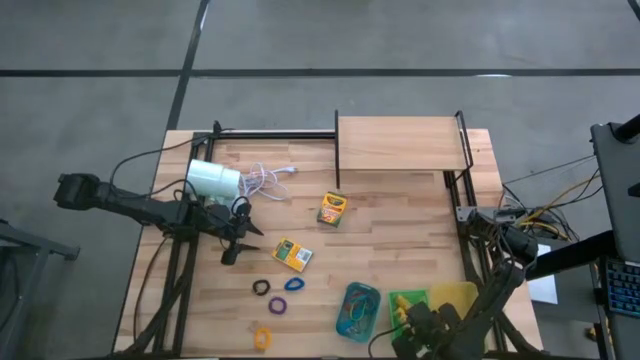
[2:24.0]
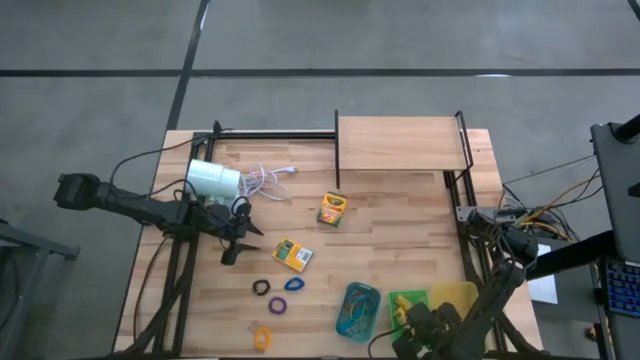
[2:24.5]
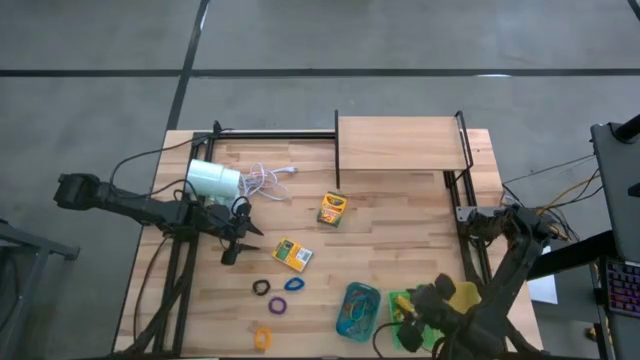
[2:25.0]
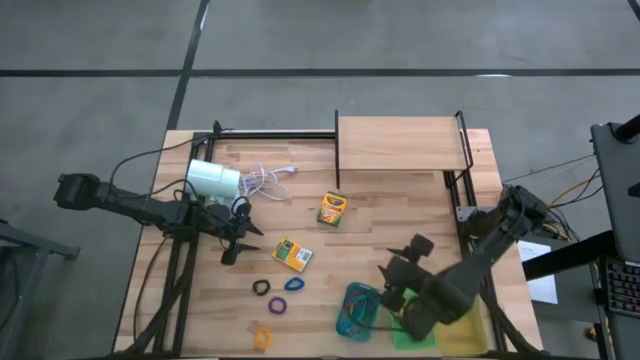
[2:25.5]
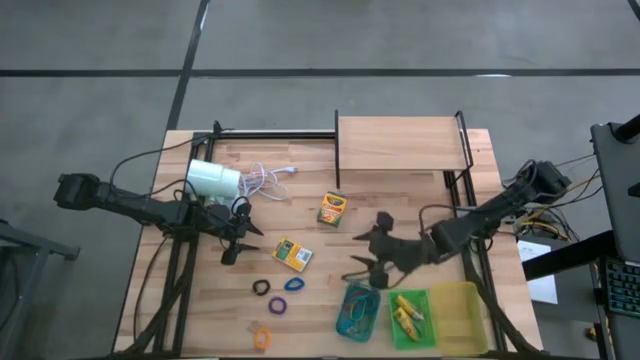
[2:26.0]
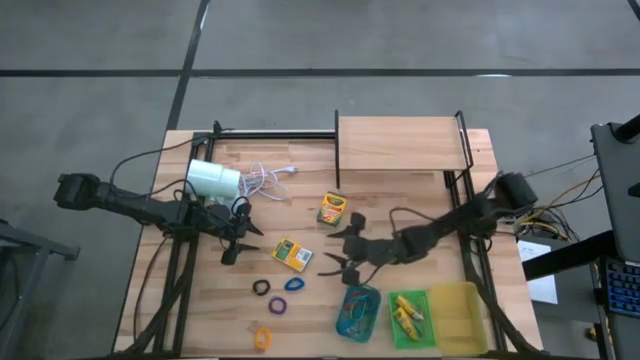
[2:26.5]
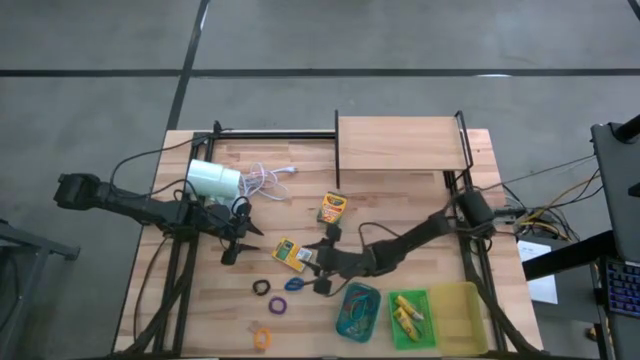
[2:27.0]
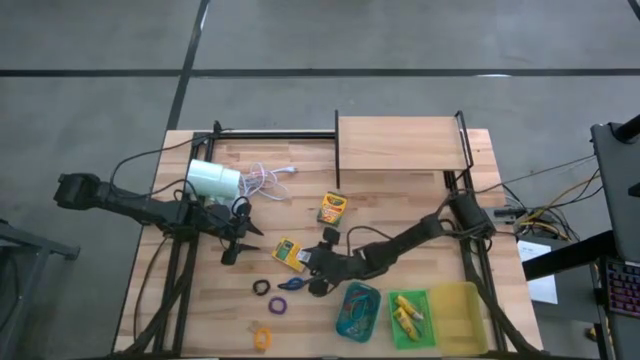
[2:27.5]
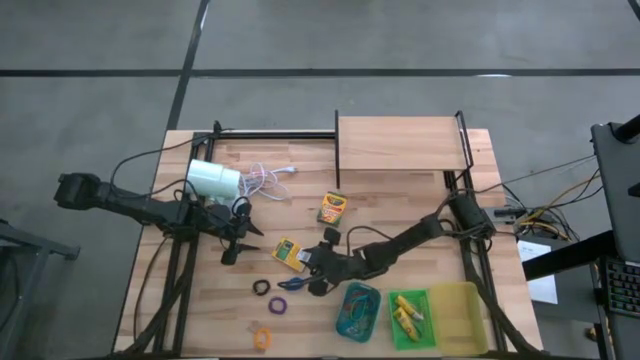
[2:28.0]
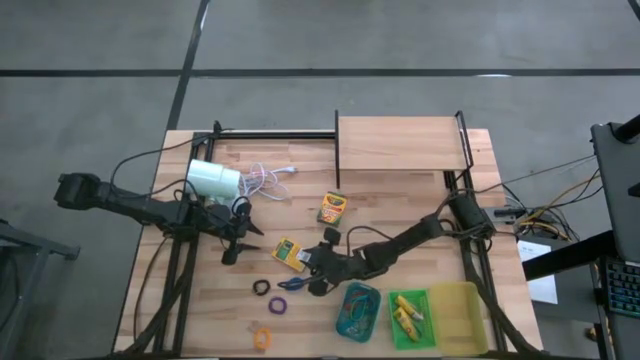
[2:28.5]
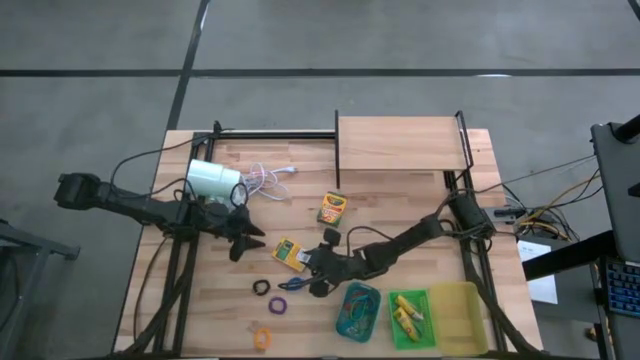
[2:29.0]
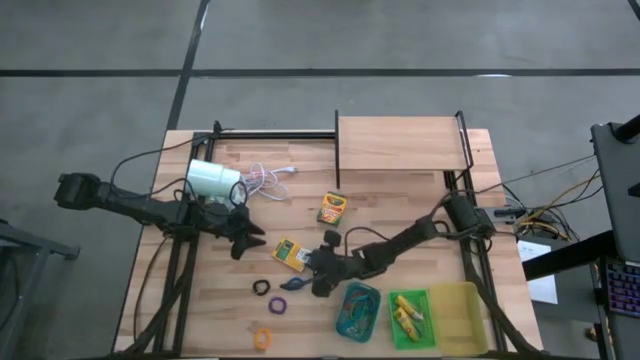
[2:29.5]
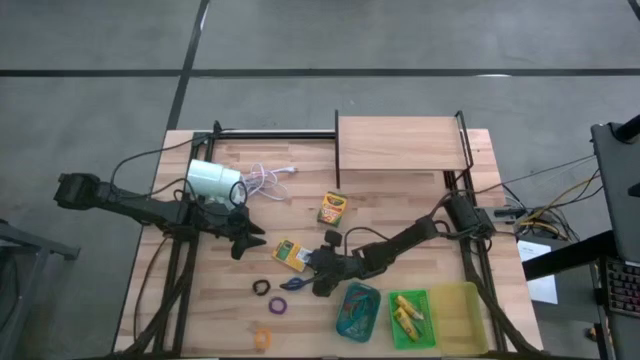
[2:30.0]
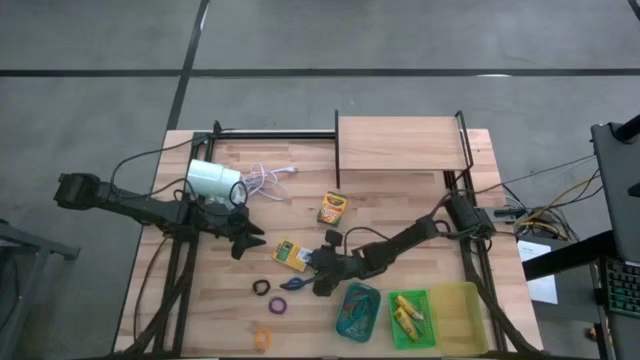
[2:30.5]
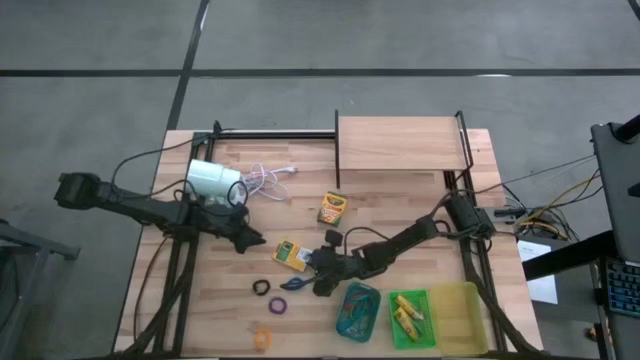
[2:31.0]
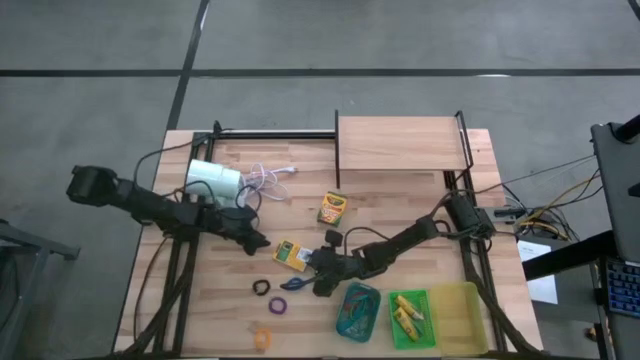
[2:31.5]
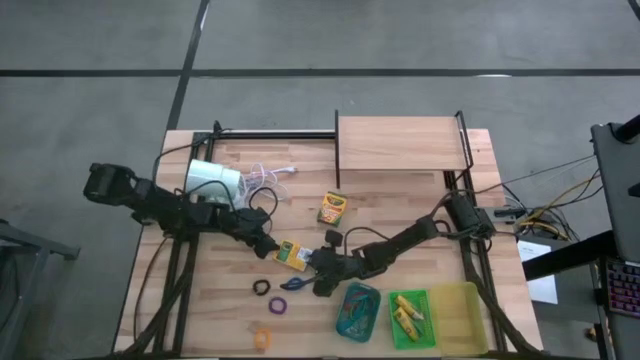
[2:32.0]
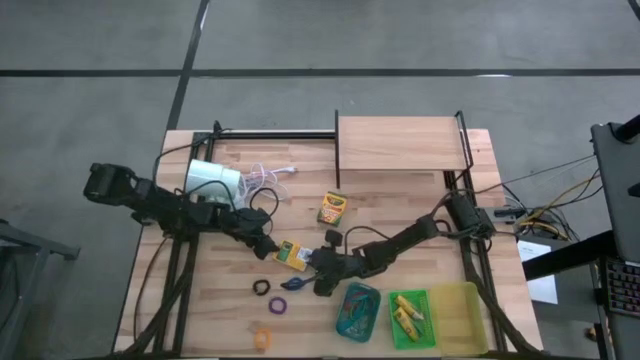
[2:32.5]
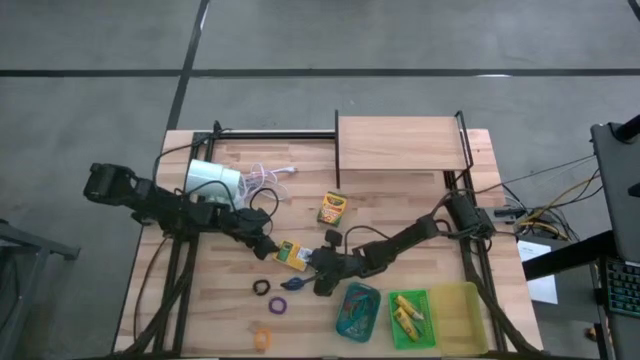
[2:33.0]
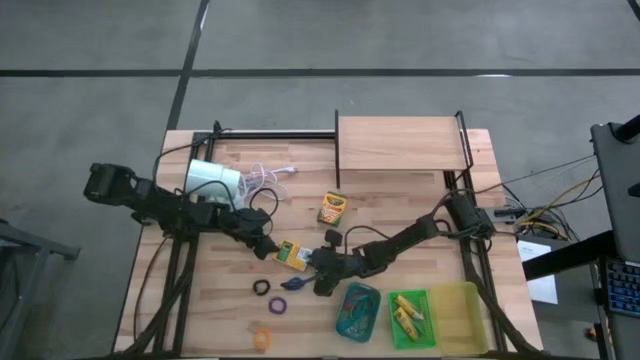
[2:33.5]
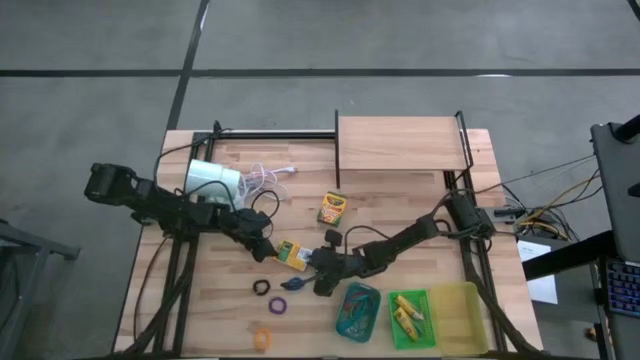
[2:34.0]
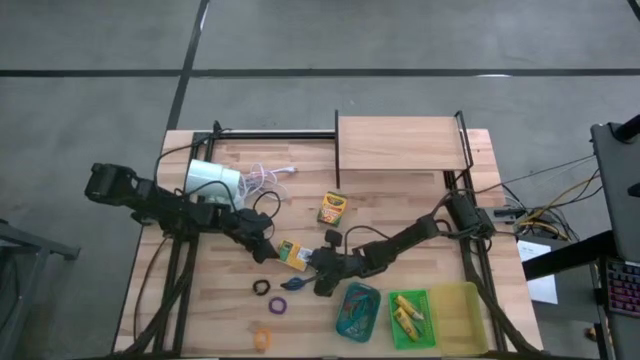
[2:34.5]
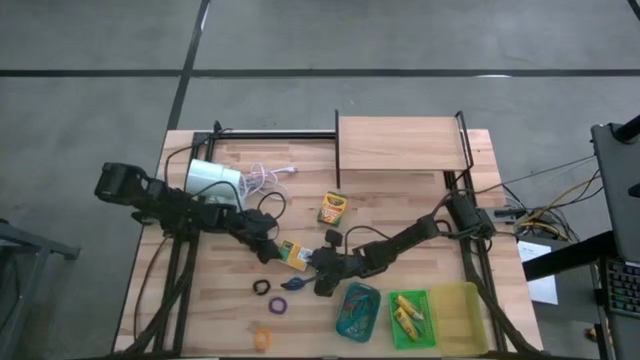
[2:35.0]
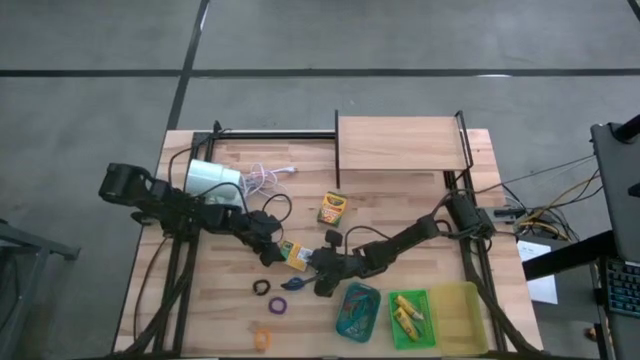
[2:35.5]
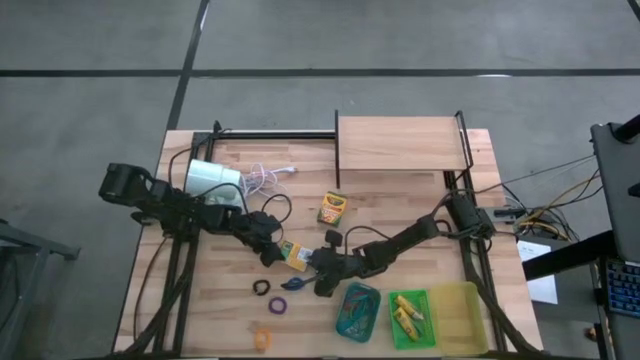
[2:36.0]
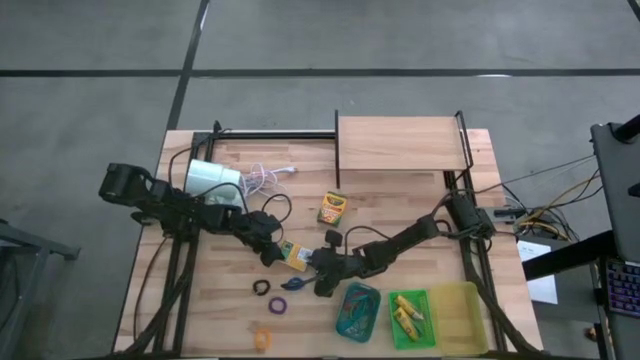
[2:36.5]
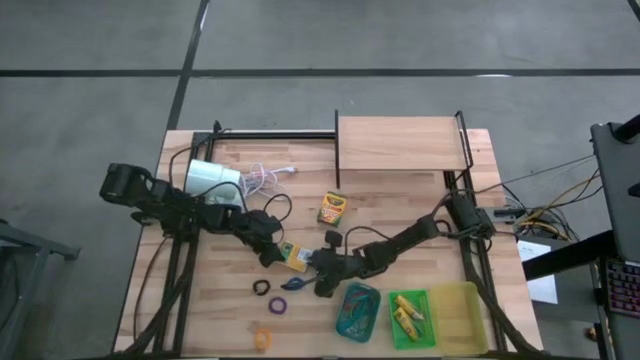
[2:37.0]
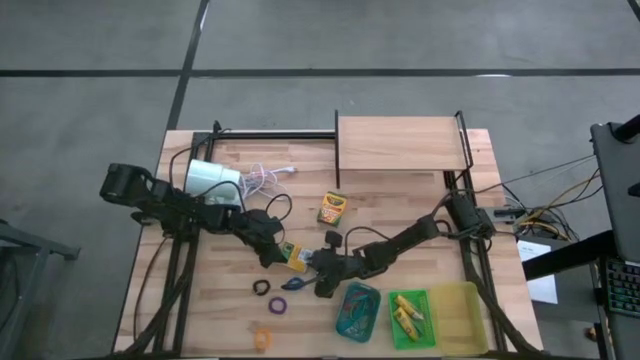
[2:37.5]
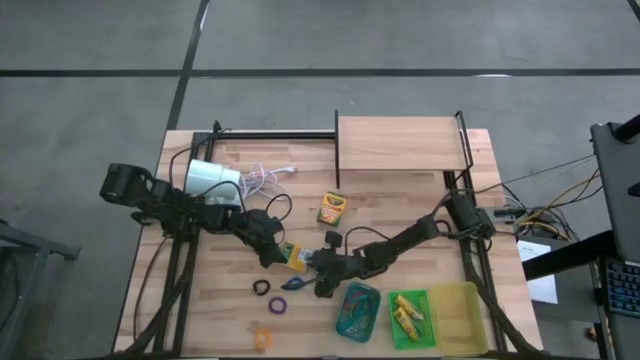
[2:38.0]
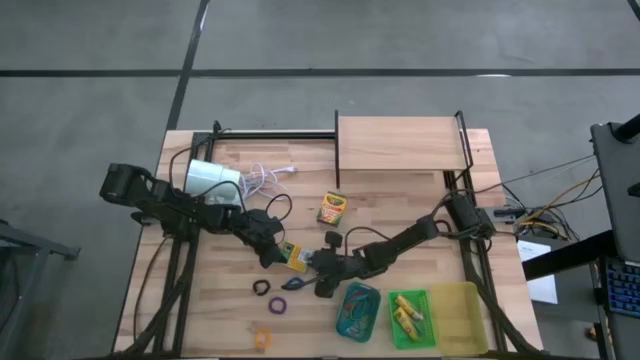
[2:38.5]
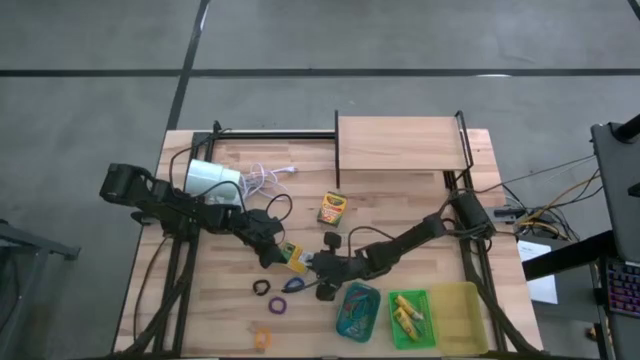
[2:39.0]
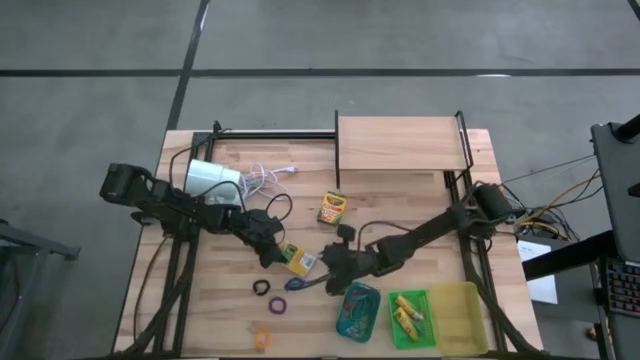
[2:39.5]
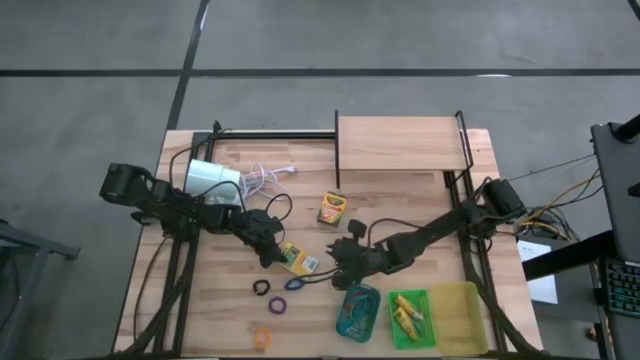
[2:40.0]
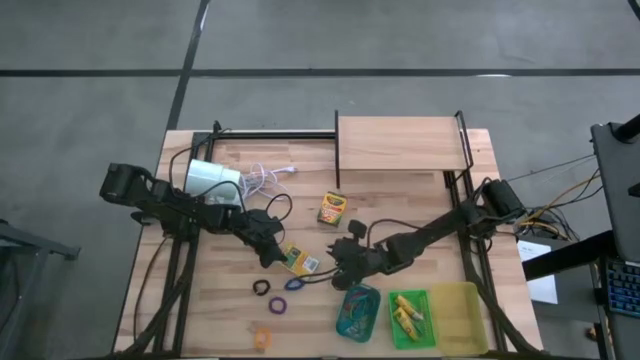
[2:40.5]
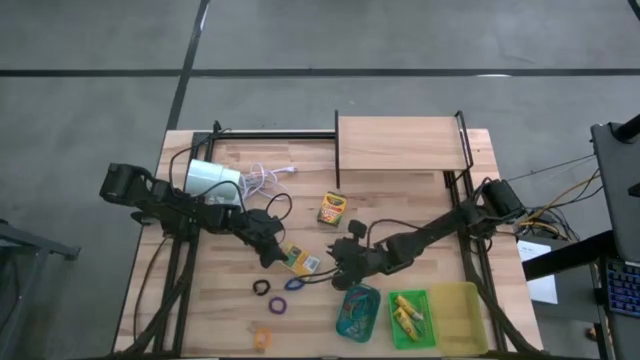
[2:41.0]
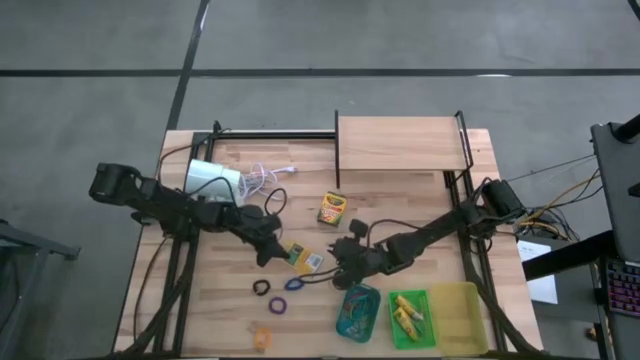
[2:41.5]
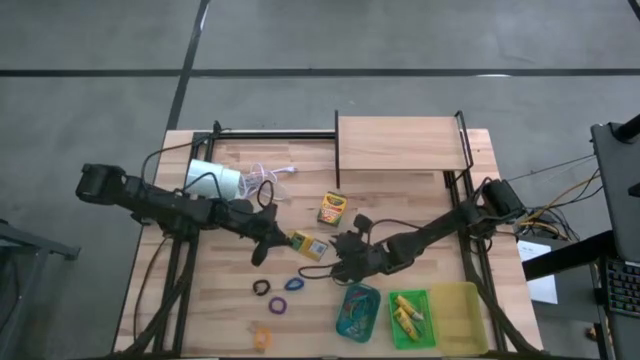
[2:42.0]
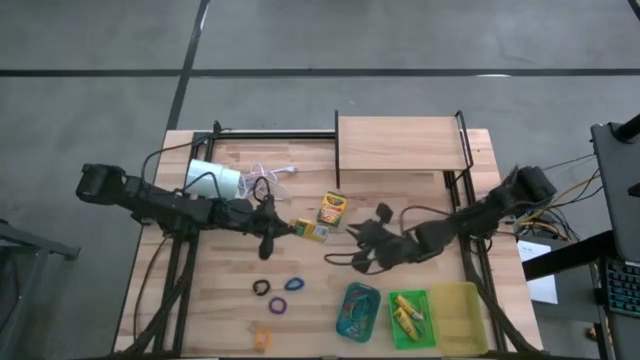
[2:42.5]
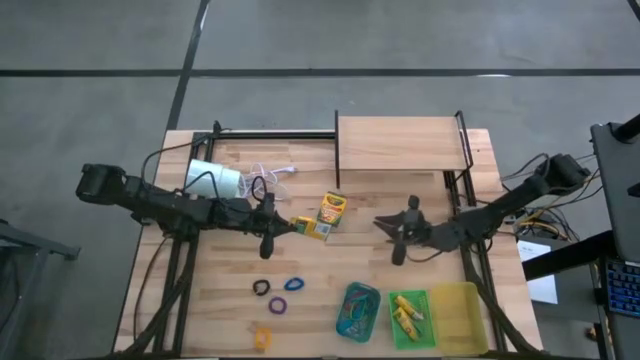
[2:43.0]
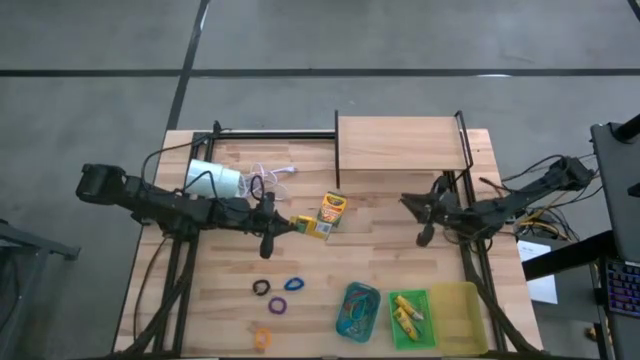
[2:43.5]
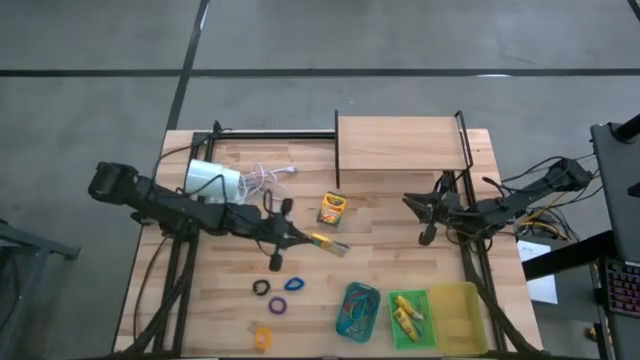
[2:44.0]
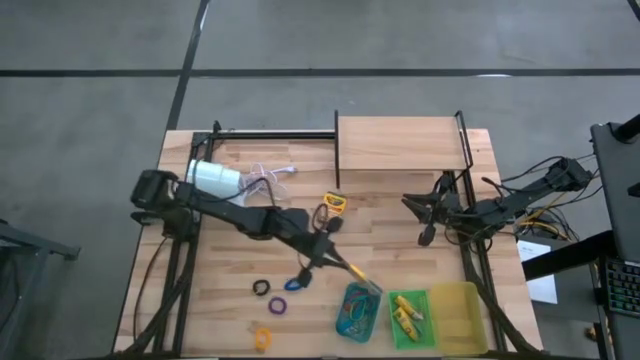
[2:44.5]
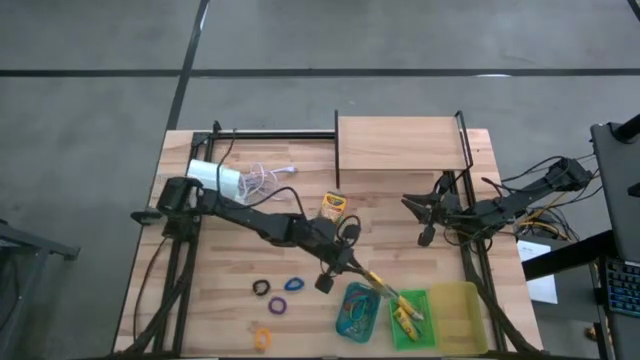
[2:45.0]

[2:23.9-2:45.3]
Task: Pick & Place Office Desk Supplies
Put the crayon box into the green bin
